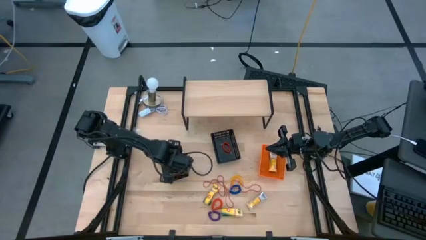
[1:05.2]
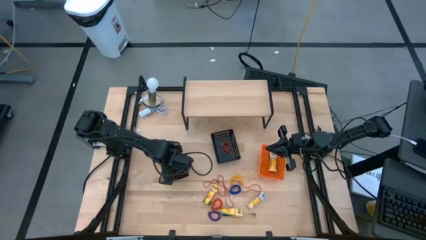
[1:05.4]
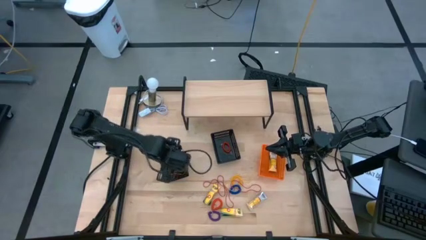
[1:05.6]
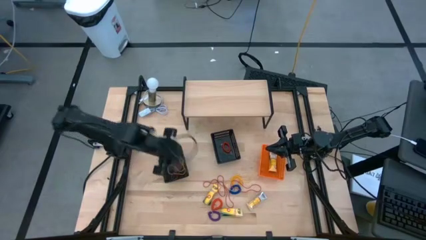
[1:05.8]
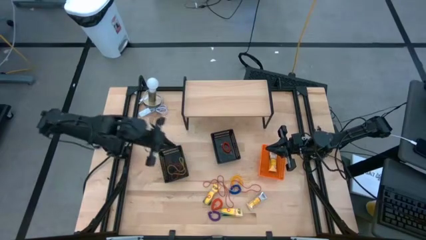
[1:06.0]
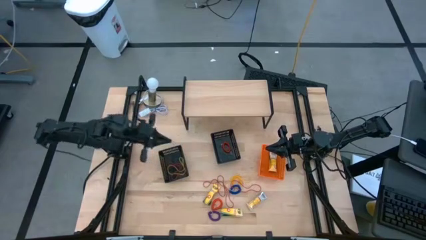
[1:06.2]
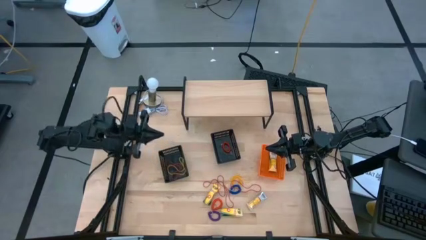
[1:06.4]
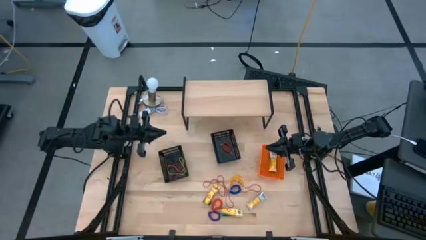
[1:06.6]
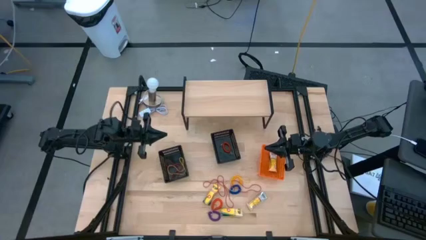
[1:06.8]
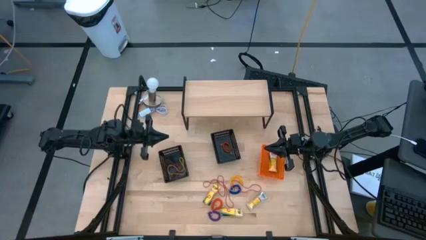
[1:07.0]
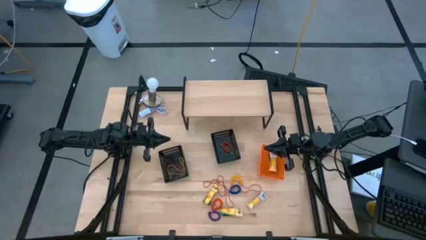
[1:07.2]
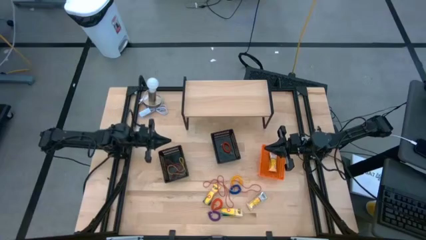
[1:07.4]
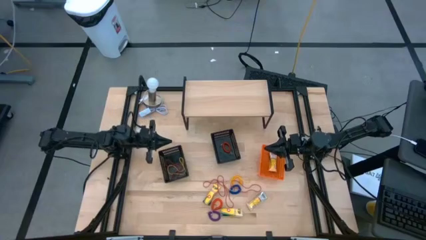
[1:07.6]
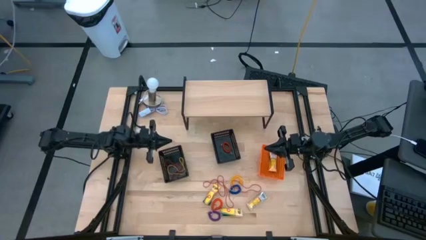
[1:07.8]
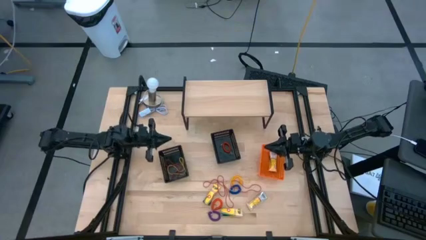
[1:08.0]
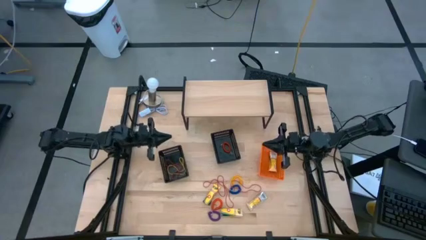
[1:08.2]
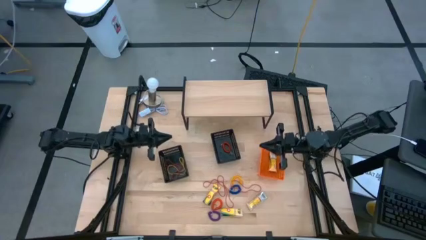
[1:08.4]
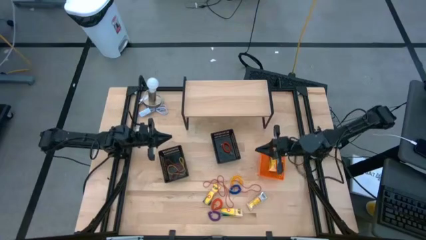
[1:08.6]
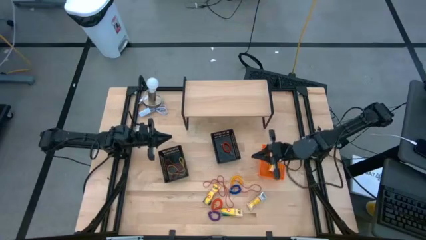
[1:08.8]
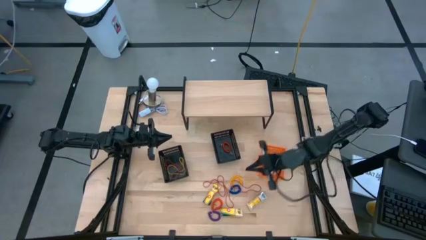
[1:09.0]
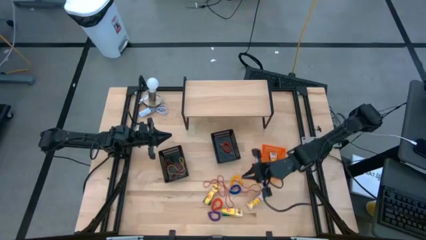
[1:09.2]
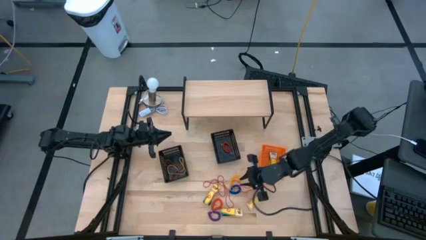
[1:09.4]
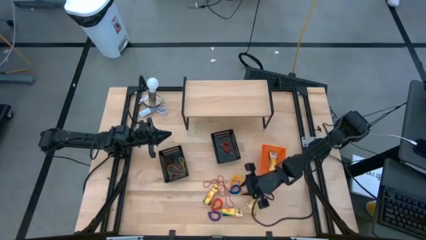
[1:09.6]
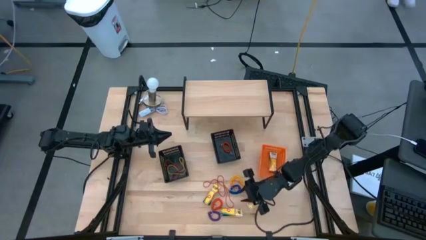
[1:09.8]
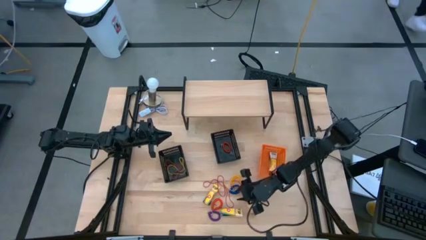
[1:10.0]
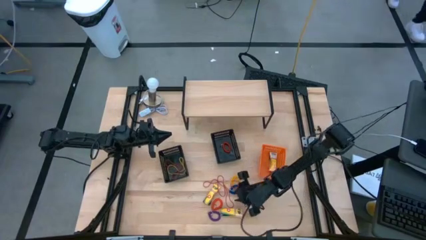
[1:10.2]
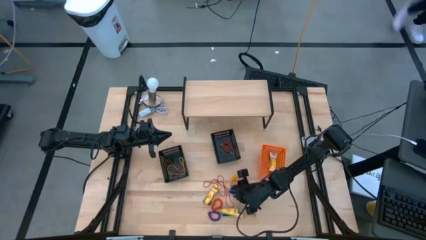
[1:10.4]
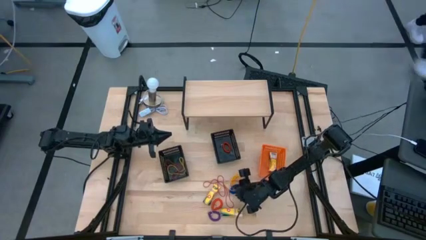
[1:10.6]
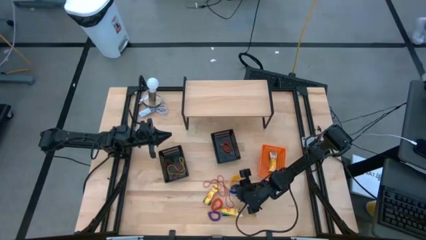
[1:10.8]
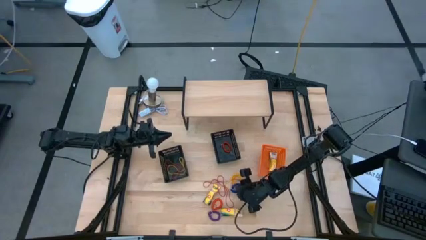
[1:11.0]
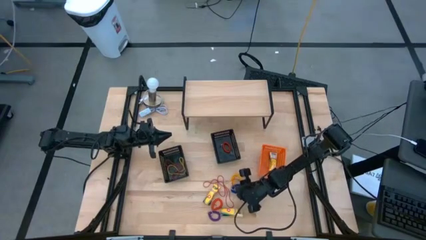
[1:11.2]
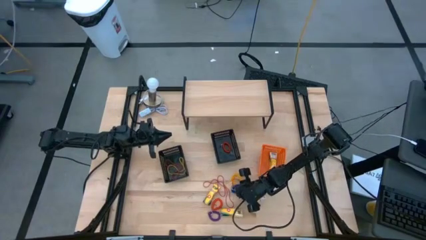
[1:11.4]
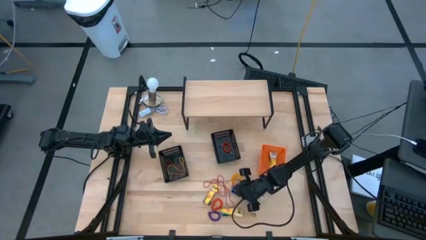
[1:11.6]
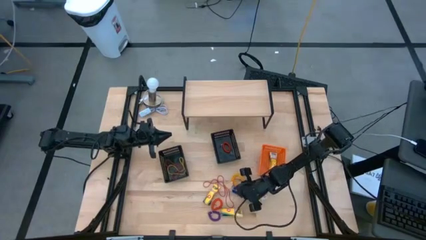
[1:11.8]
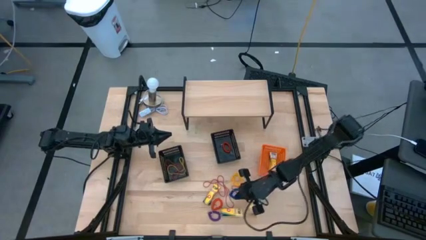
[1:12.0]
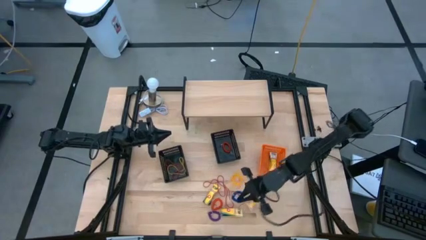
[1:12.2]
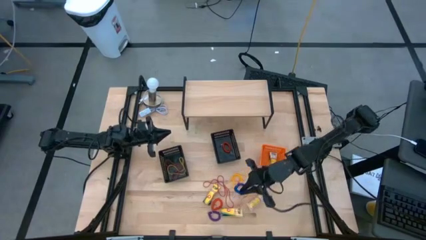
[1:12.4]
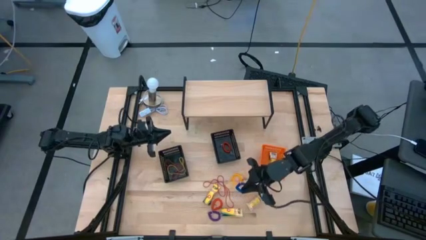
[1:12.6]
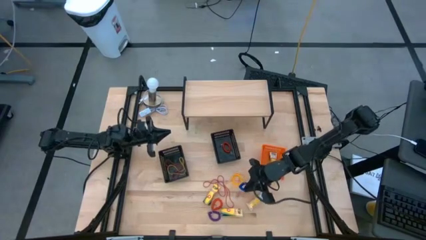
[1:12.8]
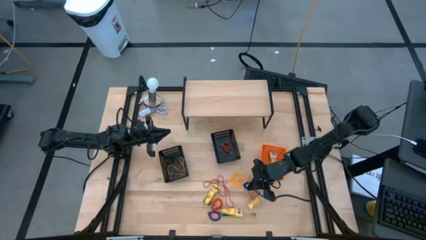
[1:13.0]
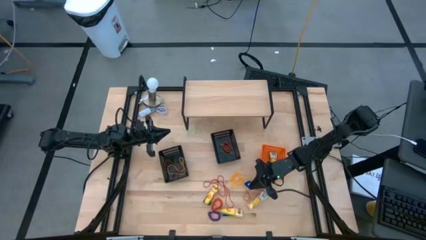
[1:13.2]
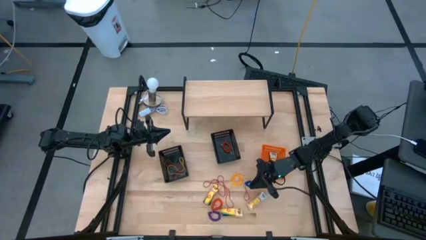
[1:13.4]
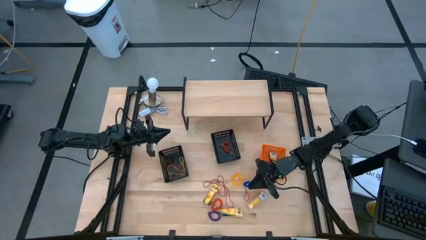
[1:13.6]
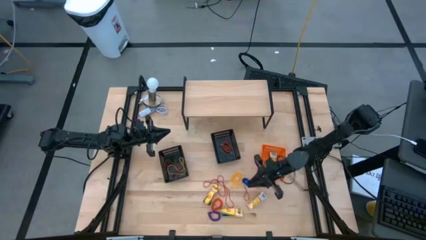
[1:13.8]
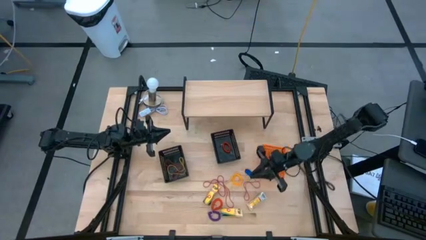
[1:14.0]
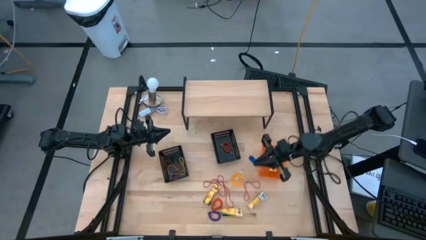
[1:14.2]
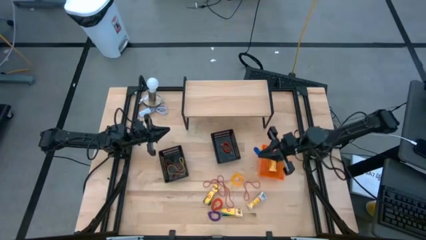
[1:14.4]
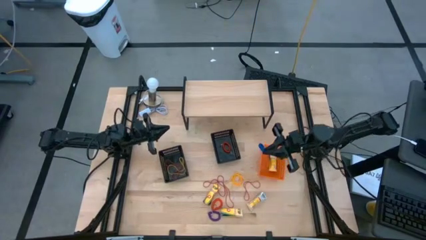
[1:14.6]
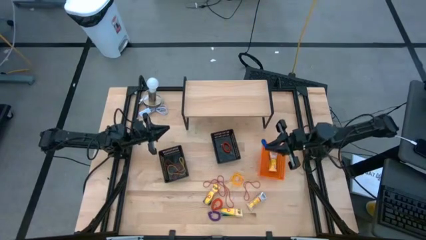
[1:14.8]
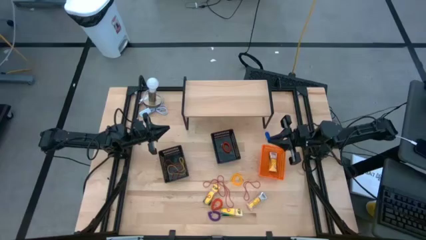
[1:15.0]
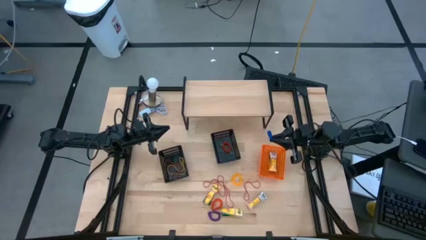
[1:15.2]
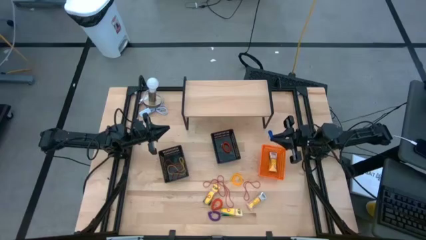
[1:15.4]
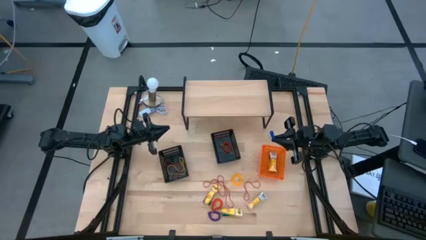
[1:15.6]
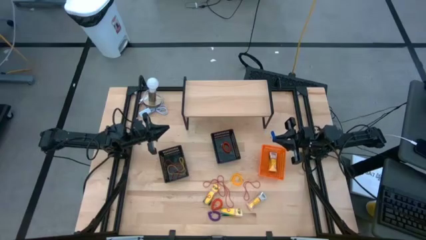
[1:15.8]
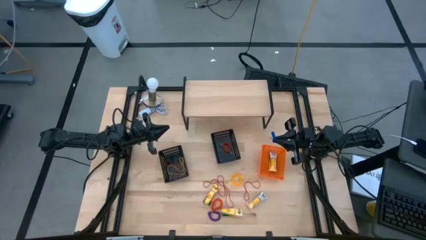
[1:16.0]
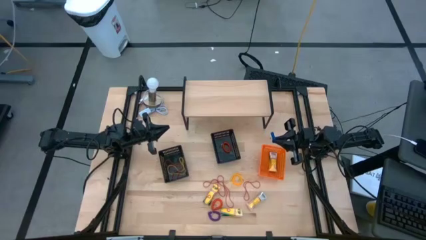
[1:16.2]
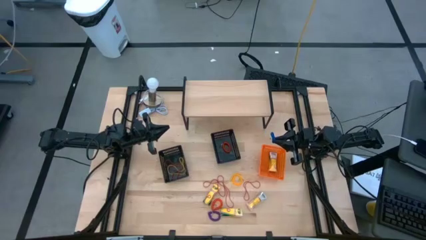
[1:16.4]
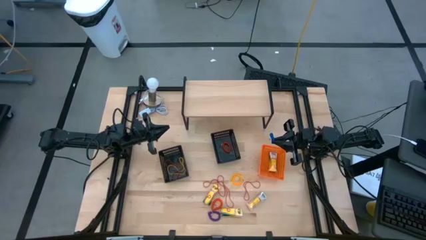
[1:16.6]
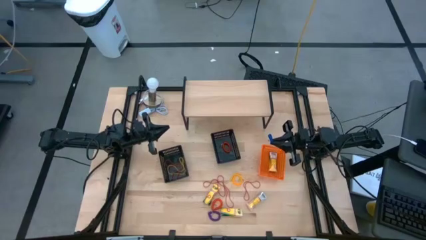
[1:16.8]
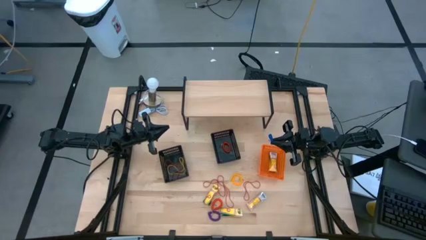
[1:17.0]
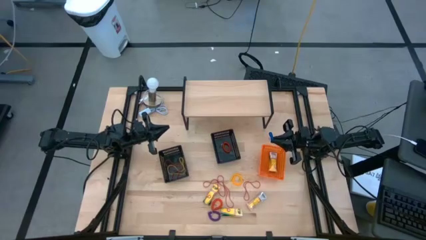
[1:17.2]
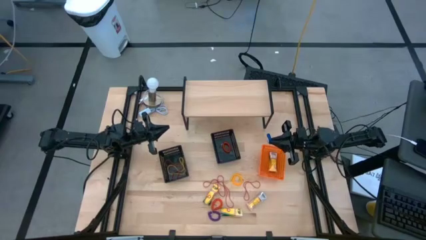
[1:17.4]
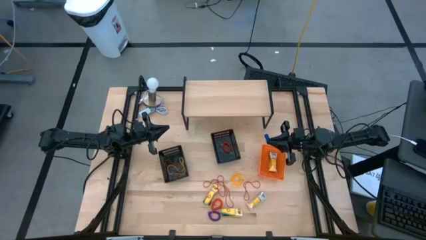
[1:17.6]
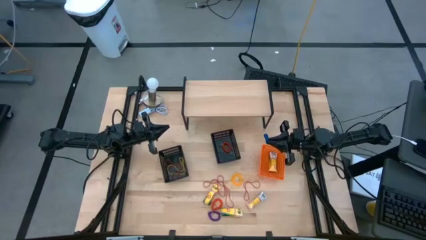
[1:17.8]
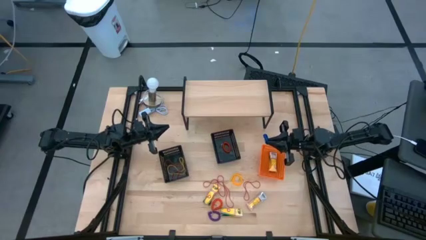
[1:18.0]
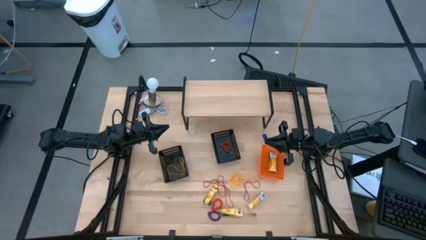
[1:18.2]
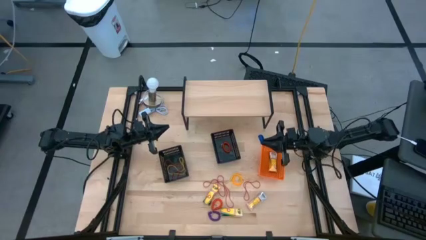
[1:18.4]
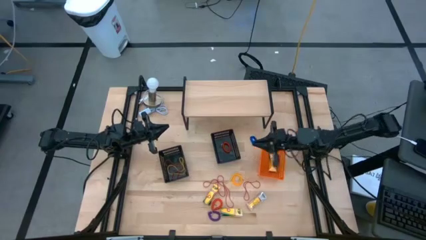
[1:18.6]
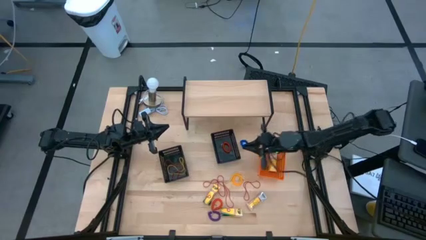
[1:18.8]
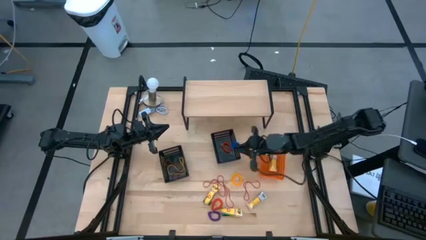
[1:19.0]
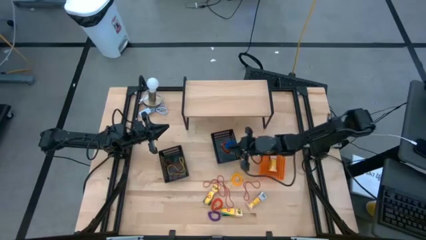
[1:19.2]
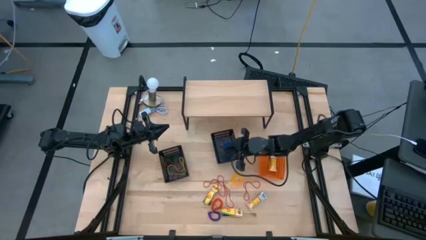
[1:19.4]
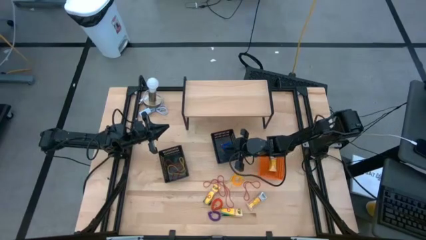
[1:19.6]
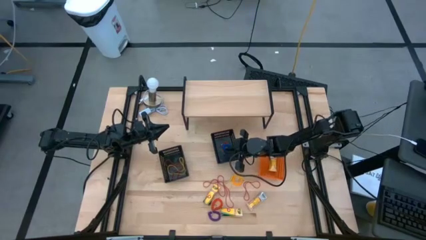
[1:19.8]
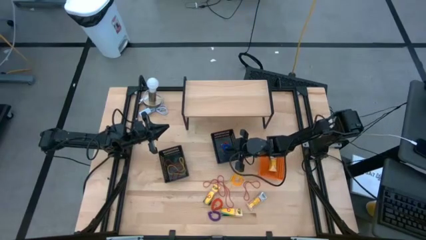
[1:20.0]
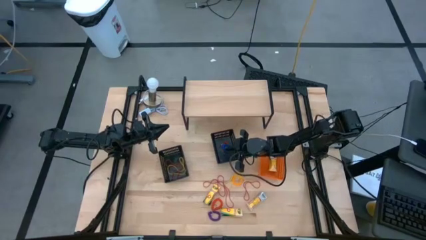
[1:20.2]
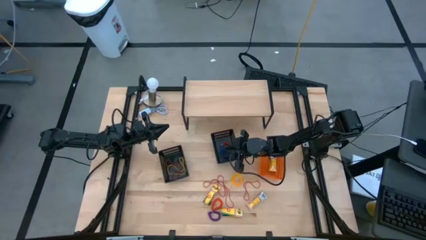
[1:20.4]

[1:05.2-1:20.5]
Task: Pick & Place Office Desk Supplies
Put the blue spring rubberband into the right black bin
